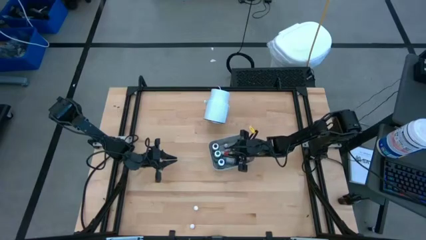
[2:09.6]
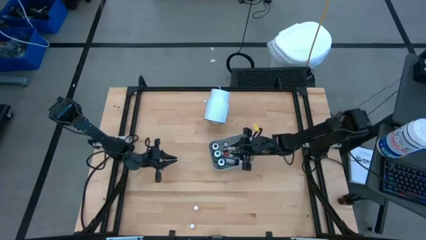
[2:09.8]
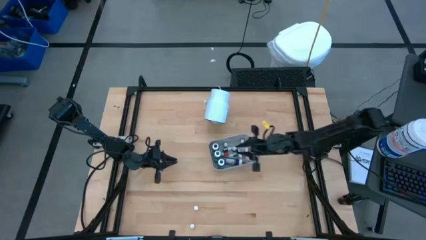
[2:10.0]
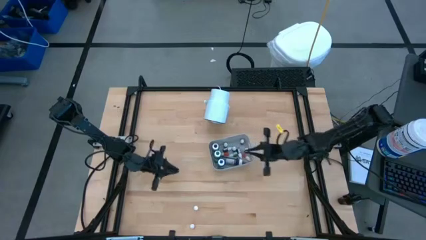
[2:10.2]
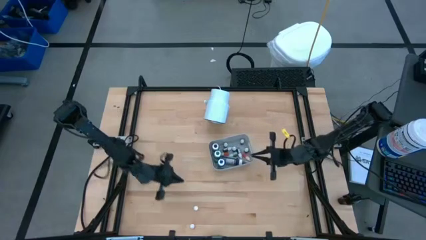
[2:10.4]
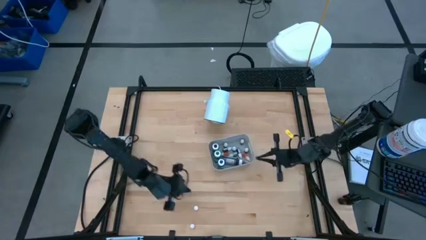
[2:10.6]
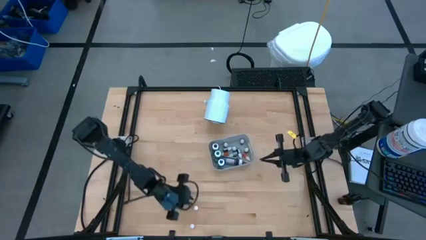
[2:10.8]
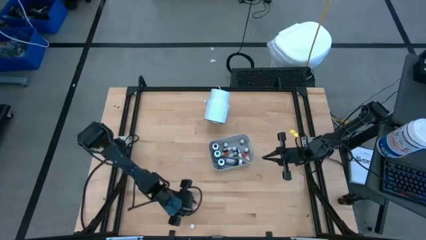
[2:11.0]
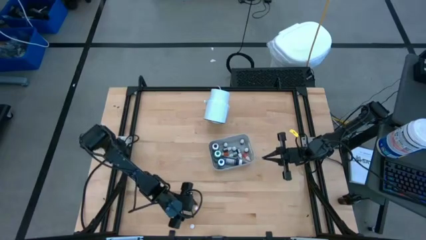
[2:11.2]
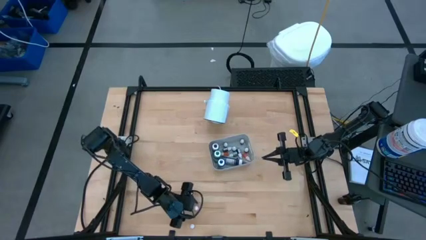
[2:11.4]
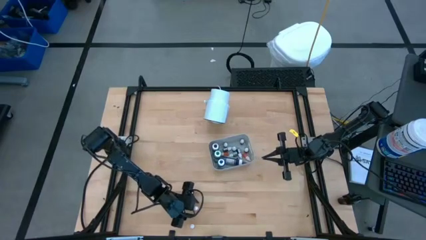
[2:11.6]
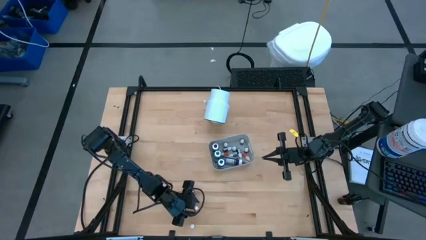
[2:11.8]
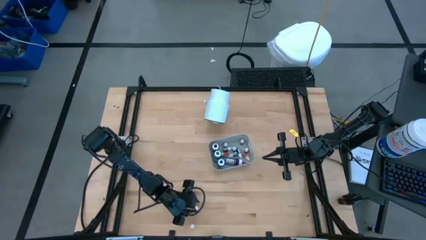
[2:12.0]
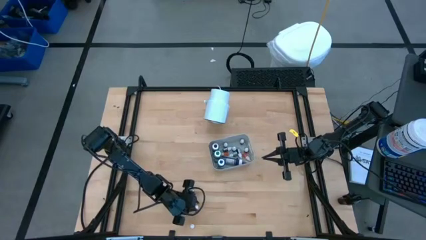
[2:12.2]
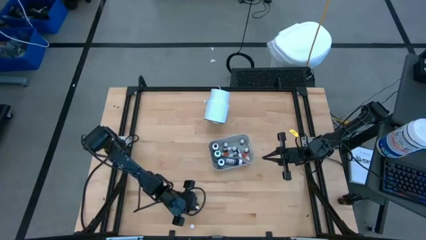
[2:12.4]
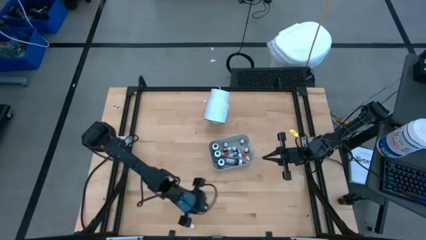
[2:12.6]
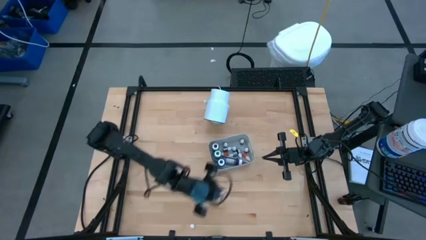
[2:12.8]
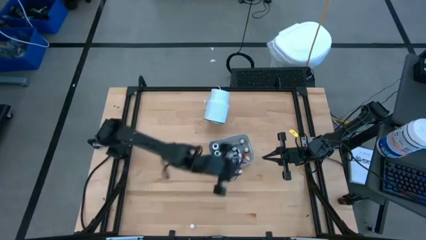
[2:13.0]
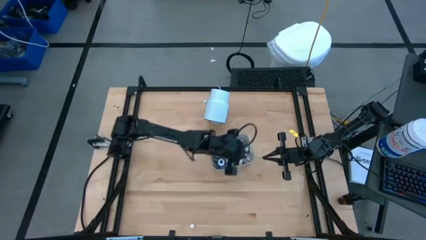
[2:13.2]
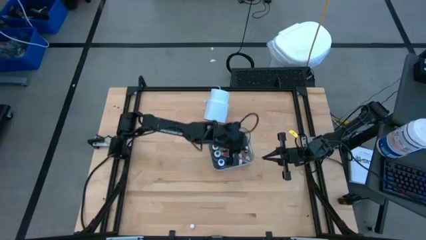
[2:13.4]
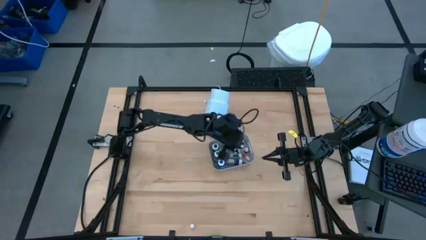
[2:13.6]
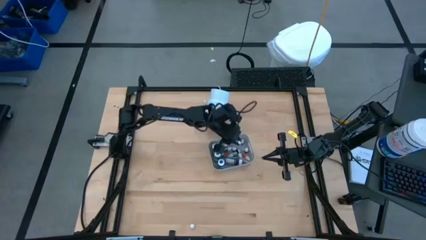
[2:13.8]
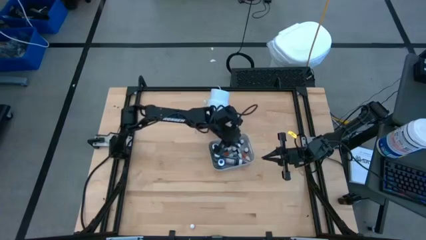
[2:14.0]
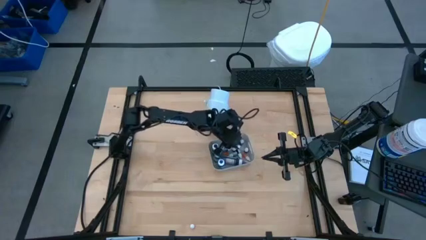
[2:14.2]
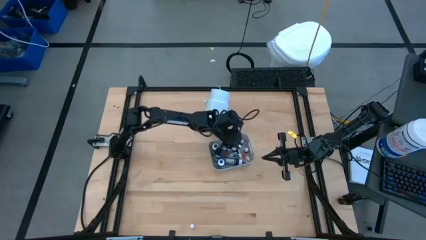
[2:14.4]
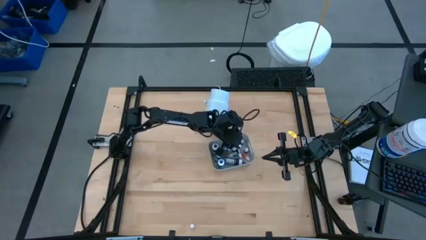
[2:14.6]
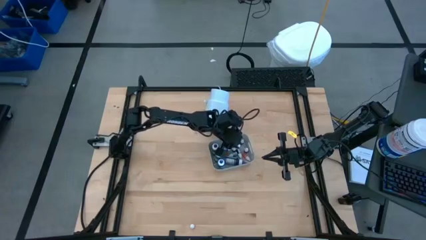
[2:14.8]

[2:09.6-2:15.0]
Task: Pick & Place food coloring
Put the small orange food coloring bottle into the gray bin

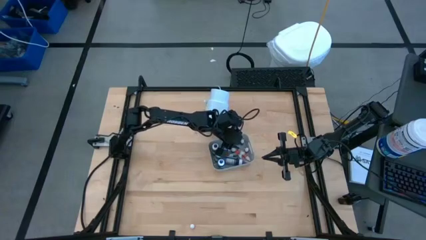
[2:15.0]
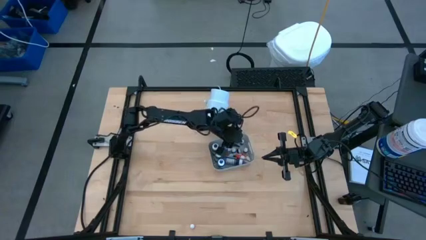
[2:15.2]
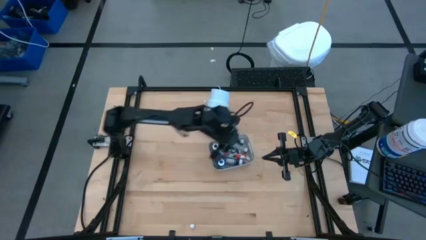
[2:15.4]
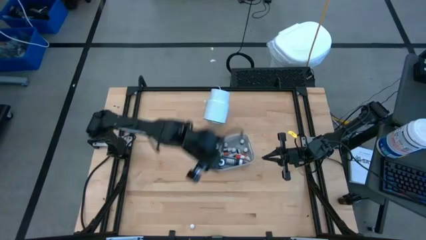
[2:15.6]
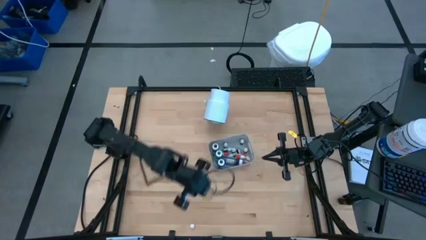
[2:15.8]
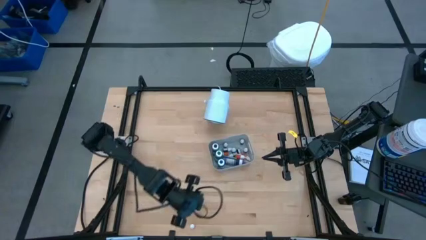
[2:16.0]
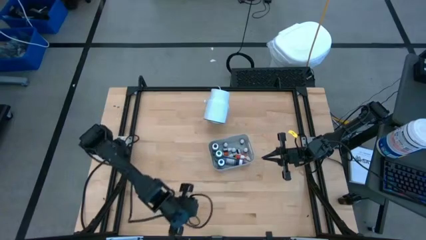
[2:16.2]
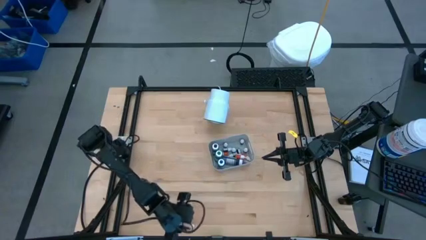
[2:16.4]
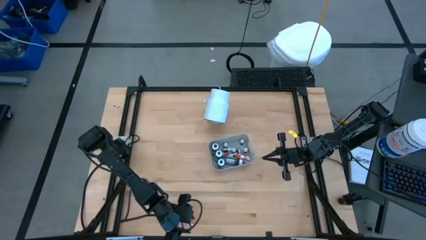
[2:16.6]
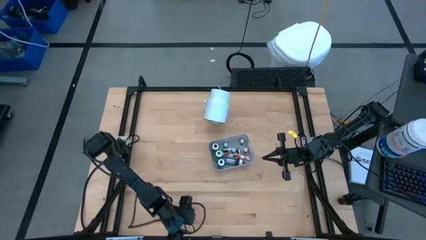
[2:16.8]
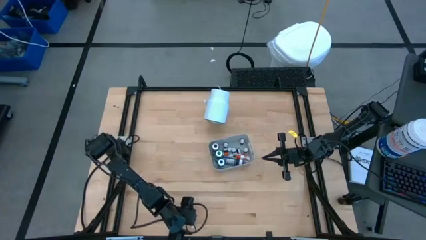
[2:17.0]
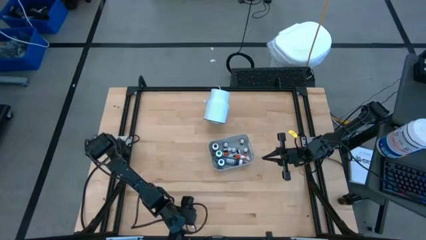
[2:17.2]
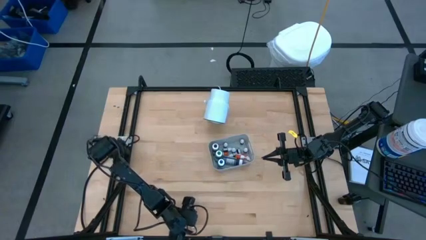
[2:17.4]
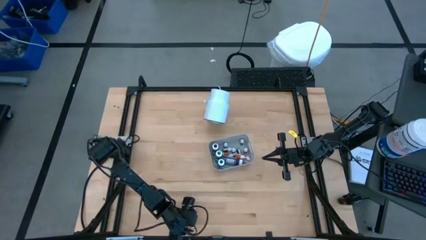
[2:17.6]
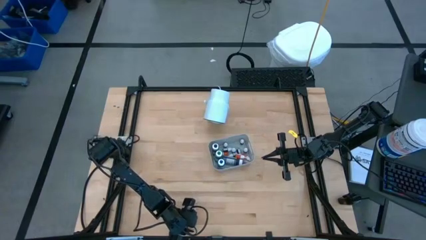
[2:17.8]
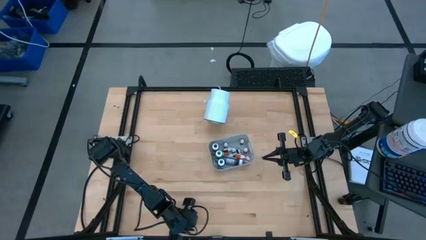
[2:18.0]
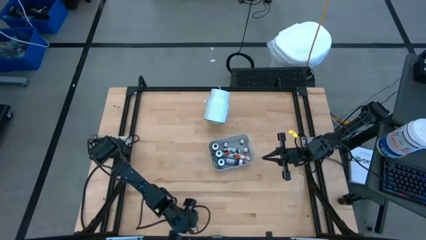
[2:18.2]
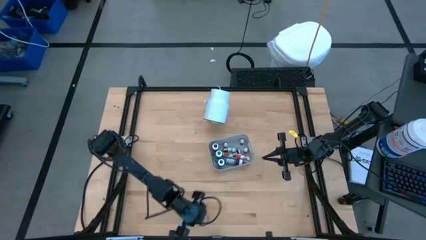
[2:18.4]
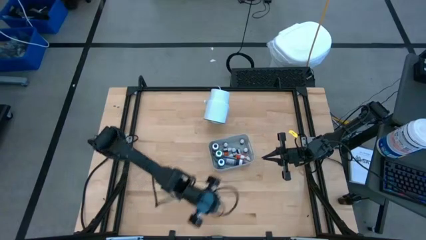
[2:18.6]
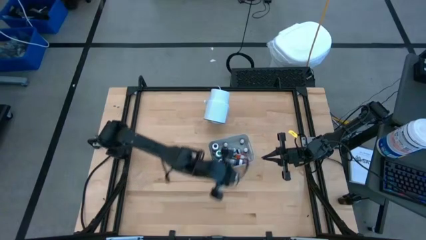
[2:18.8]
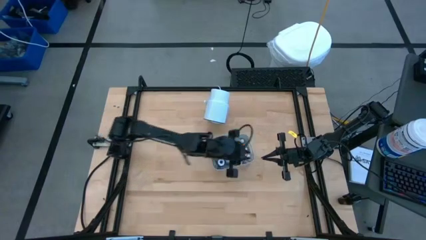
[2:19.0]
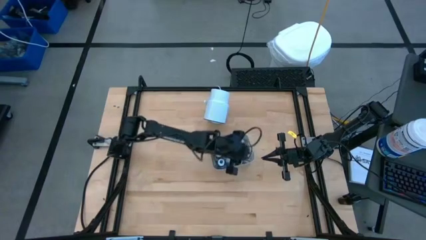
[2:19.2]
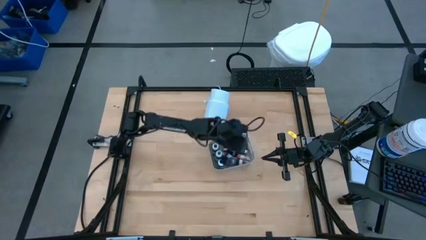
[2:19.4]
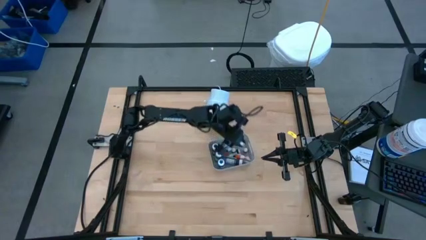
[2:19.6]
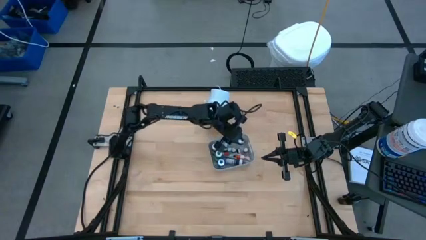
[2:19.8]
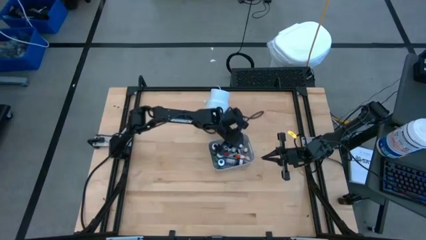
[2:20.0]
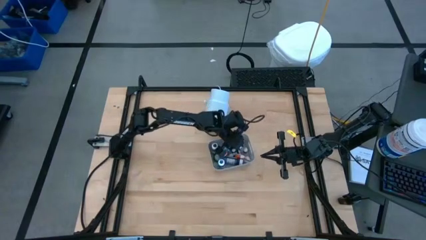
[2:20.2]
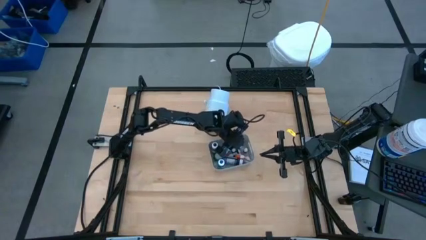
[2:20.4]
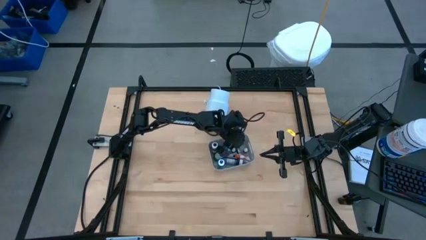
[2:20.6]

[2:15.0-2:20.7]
Put the small orange food coloring bottle into the gray bin

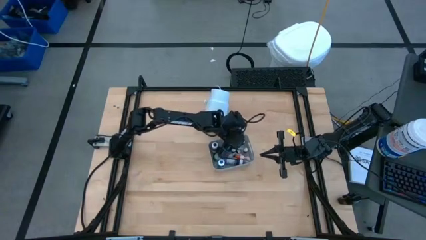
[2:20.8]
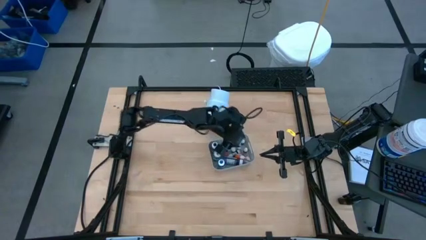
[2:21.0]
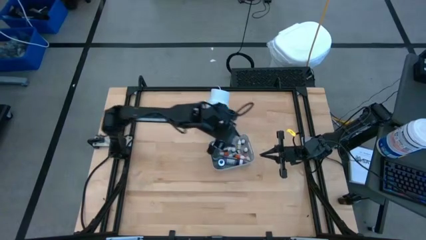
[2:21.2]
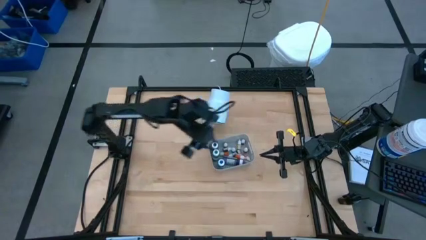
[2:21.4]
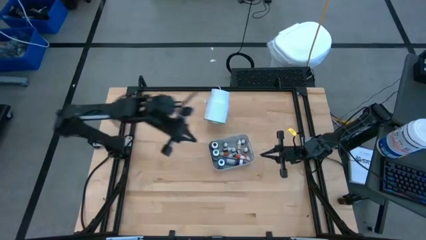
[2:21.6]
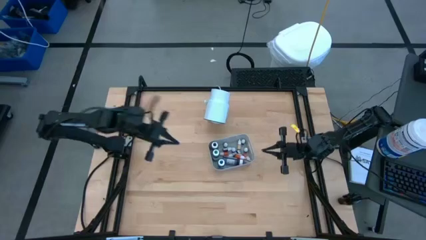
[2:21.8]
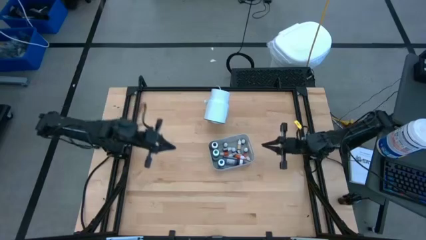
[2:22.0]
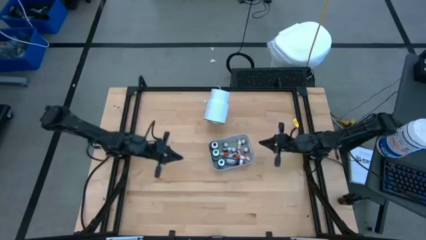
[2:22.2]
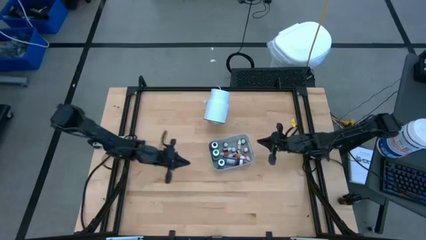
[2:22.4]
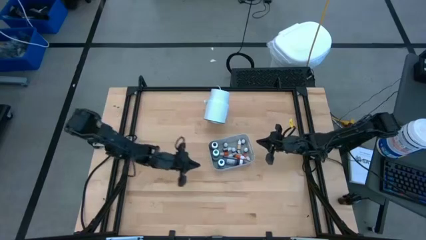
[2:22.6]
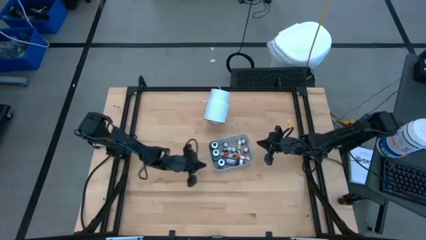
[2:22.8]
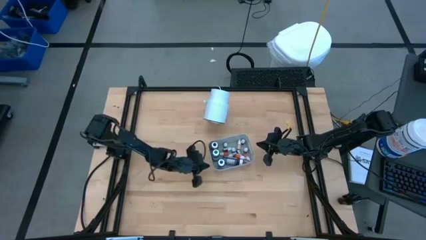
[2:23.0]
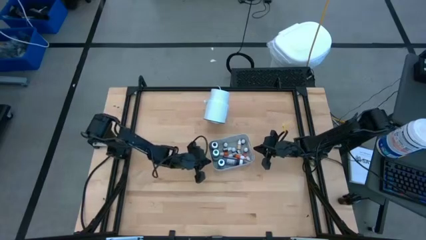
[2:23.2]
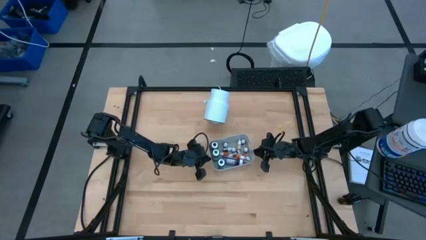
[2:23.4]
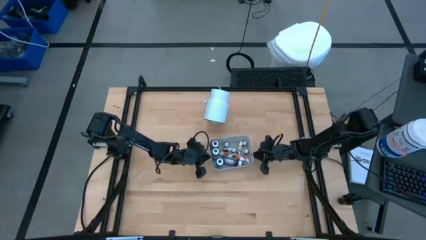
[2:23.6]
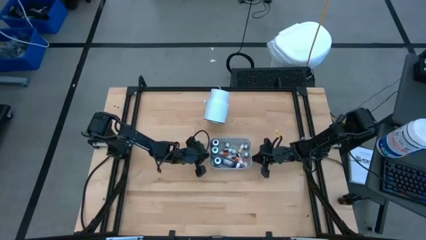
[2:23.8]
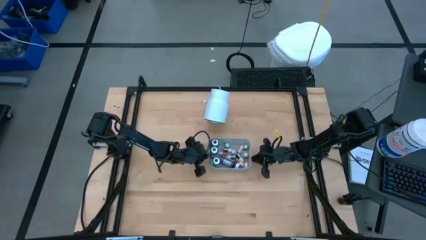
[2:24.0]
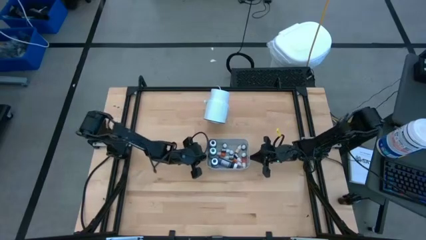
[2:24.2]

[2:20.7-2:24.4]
Adjust the gray bin
